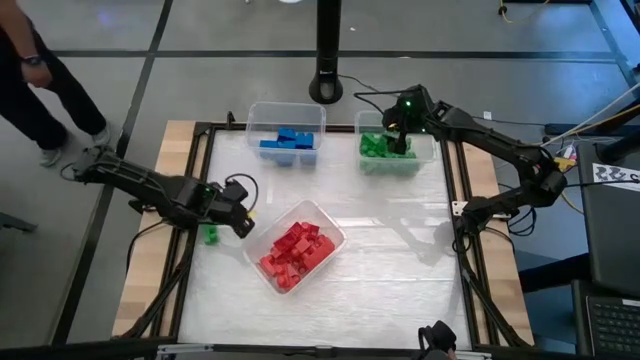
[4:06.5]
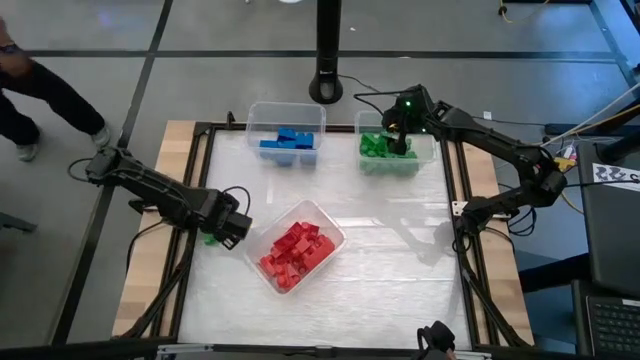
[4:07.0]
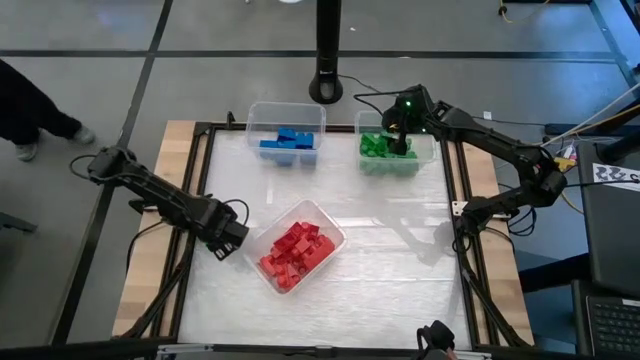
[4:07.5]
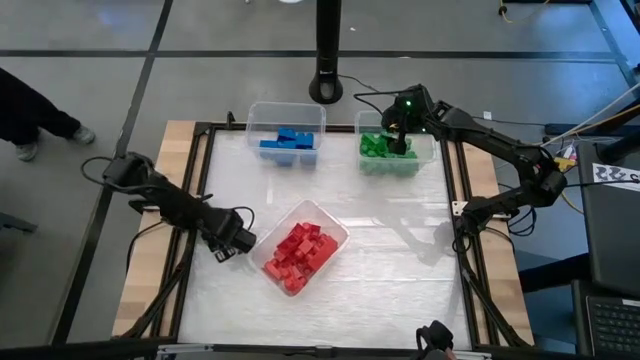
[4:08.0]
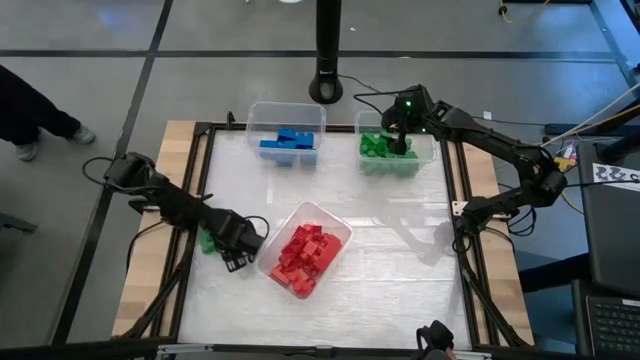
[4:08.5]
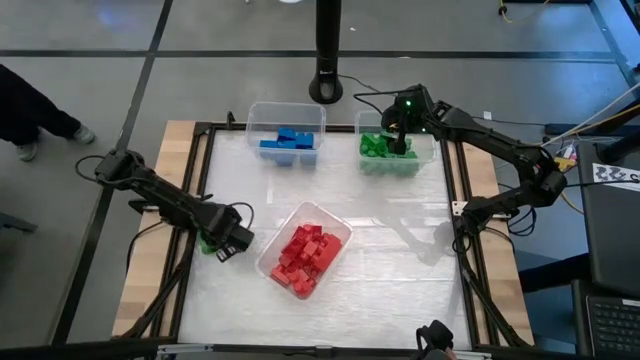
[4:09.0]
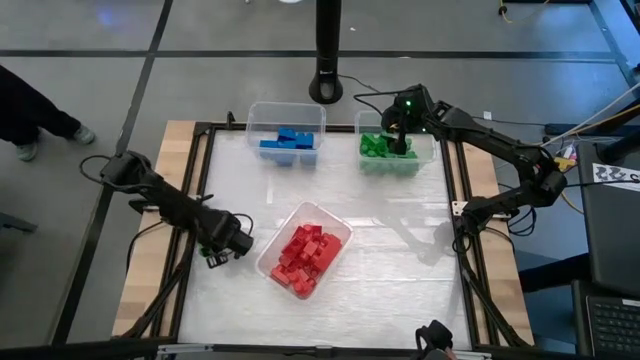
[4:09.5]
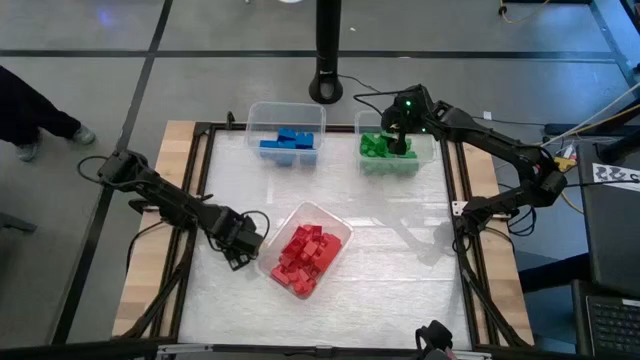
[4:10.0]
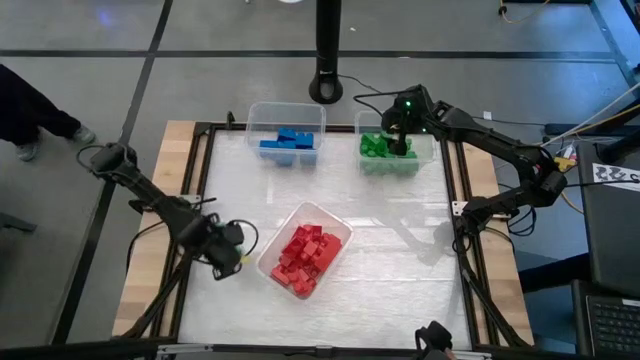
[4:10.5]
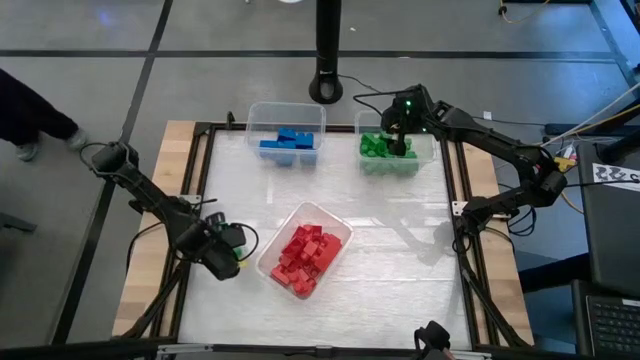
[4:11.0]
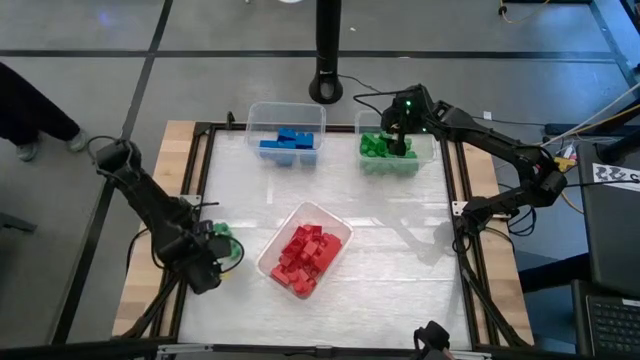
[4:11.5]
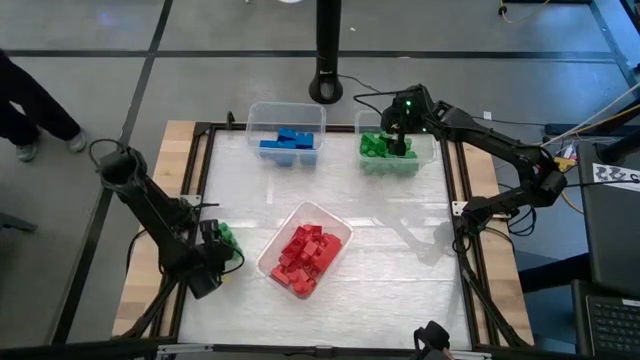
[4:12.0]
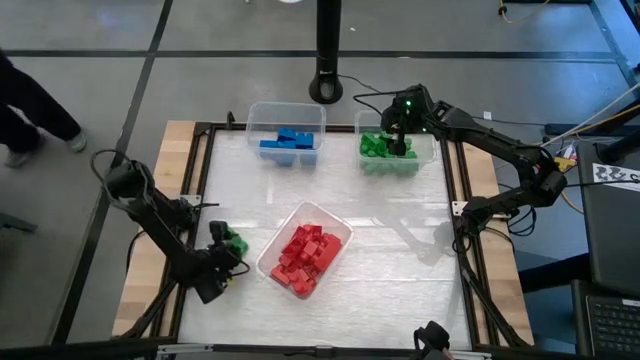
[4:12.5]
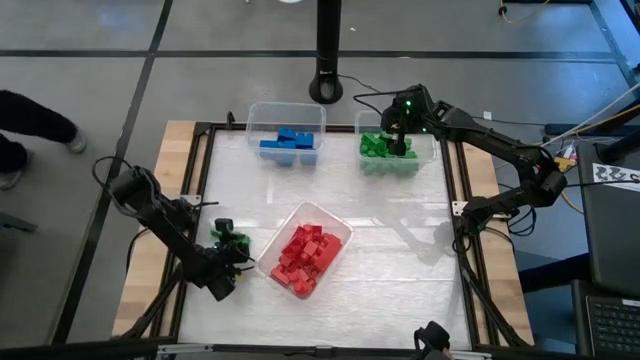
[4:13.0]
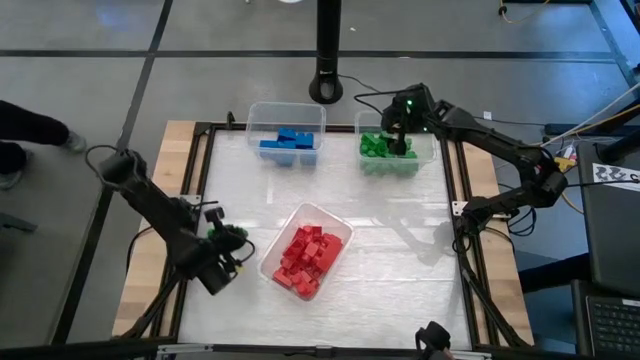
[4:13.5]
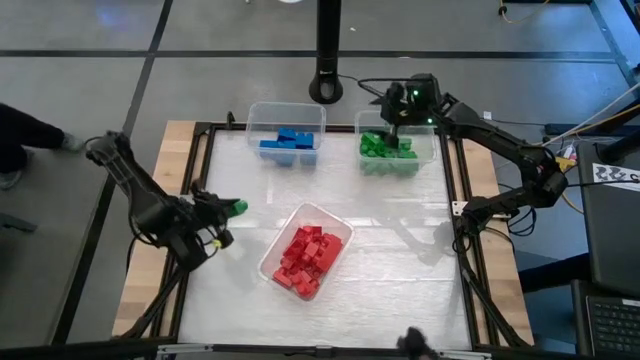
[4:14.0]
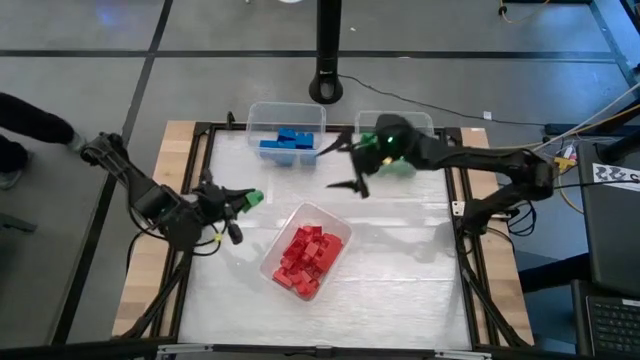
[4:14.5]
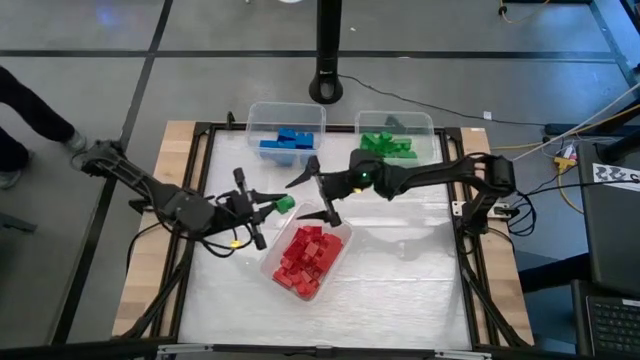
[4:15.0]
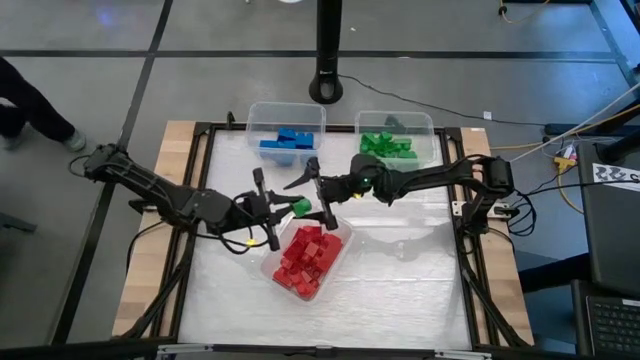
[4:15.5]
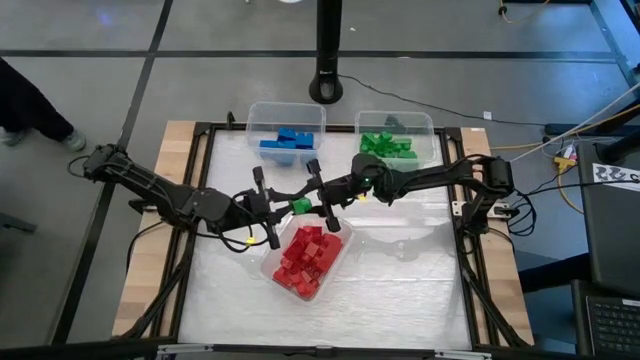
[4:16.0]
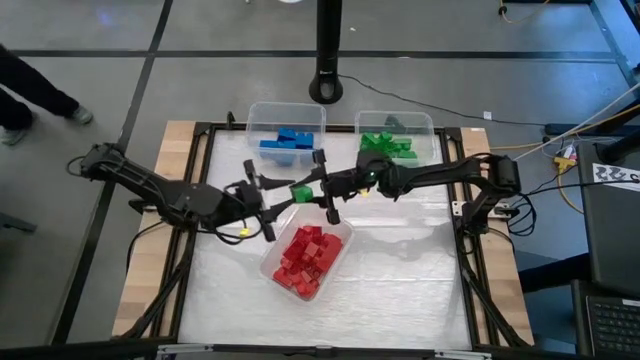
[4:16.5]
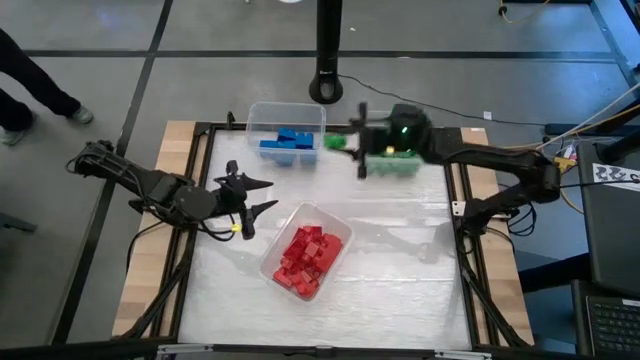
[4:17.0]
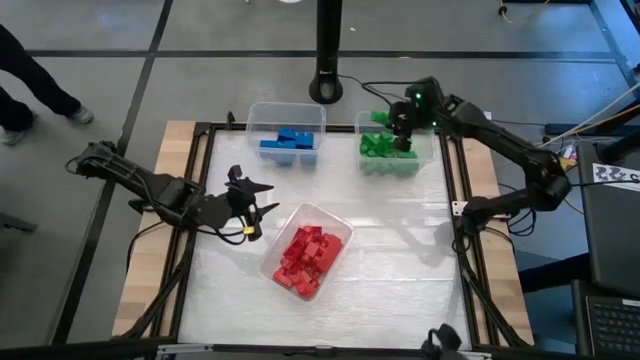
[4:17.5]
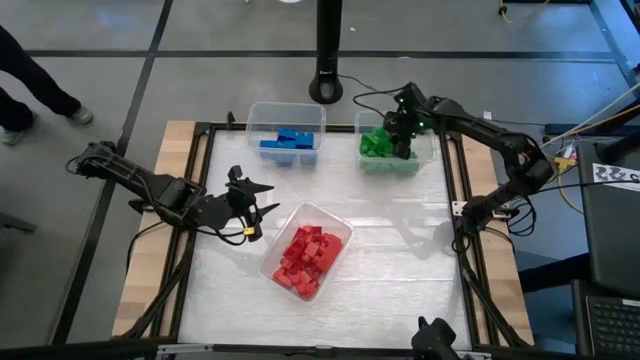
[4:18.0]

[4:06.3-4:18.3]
Task: Sort blocks
Put the green game piece into the top right transparent bin

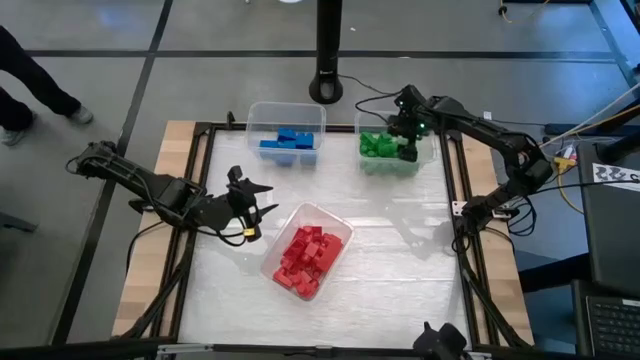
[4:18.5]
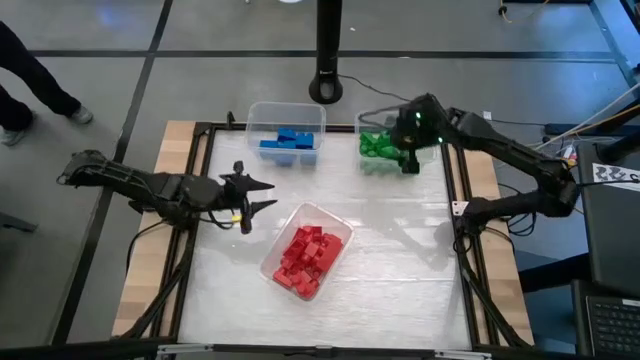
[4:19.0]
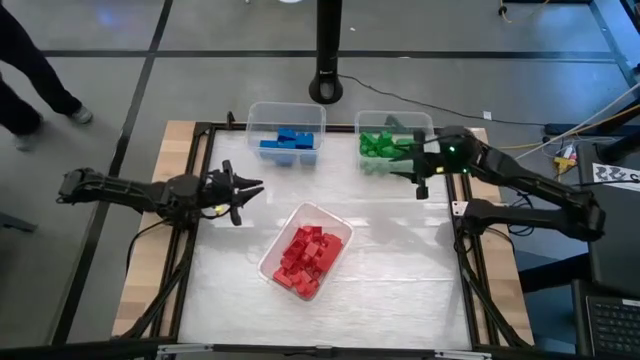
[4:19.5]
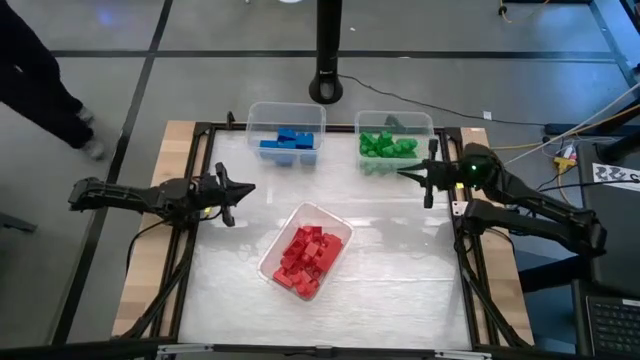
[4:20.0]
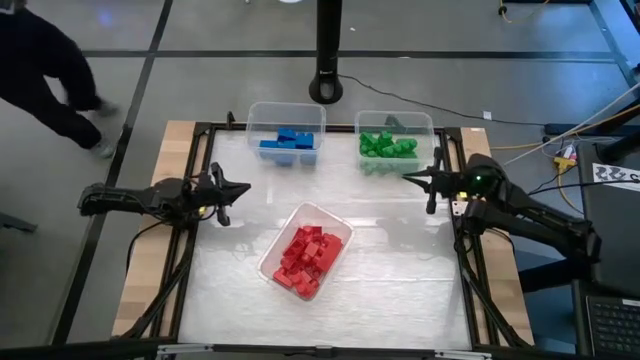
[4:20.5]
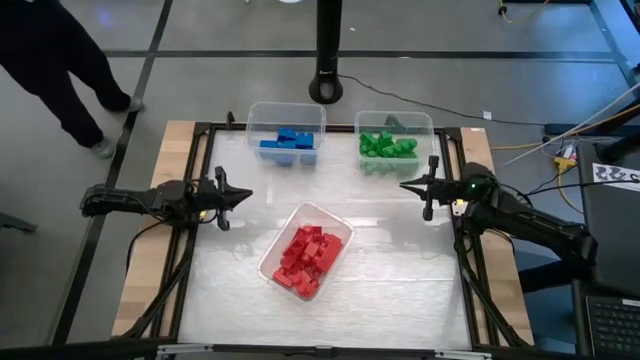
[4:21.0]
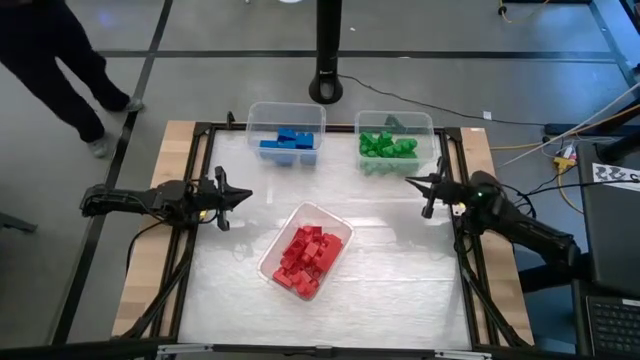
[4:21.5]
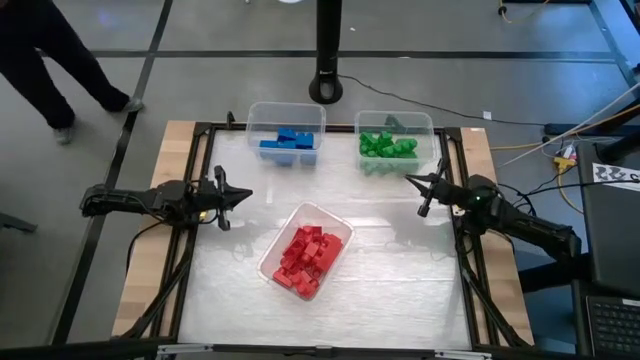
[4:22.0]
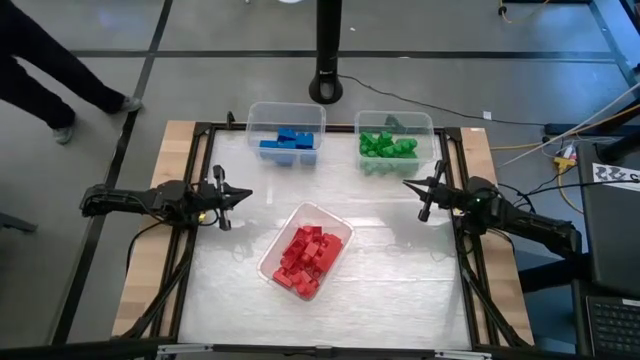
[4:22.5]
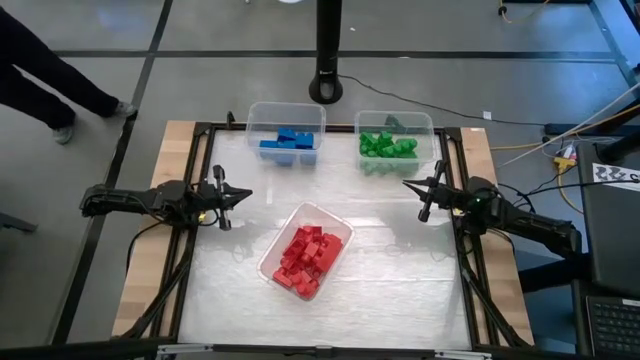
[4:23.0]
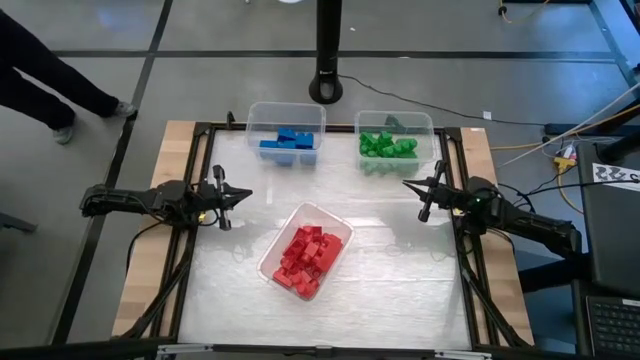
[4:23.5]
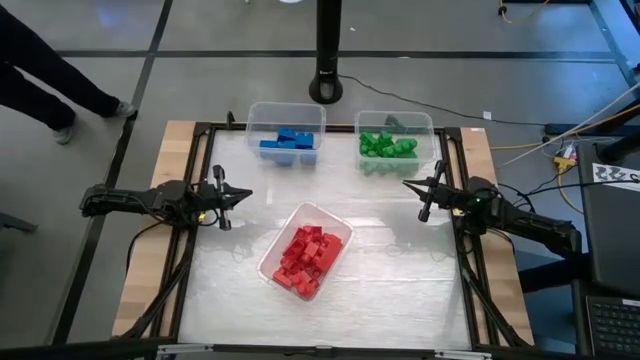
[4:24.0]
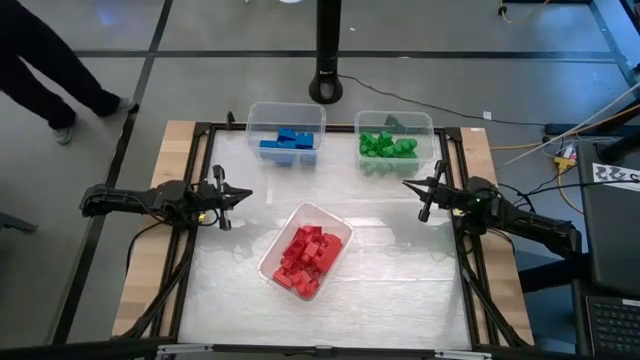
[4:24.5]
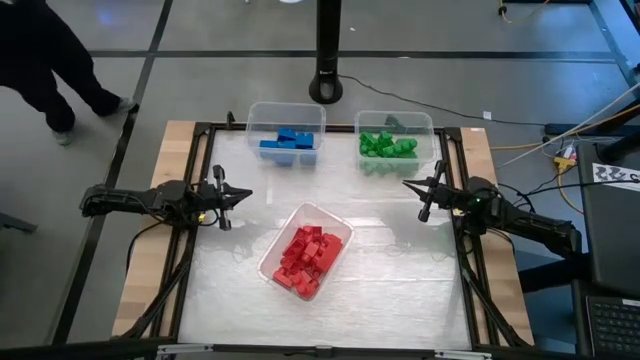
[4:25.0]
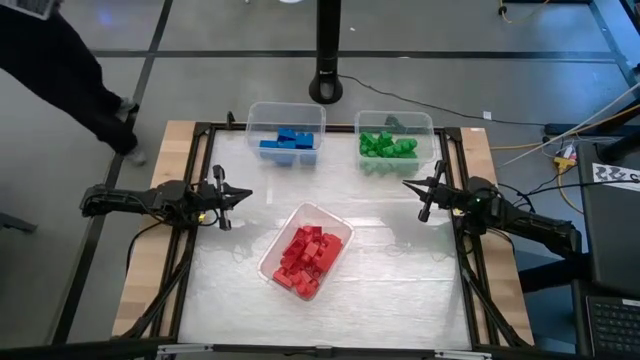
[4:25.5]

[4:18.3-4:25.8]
Return to Home Position
